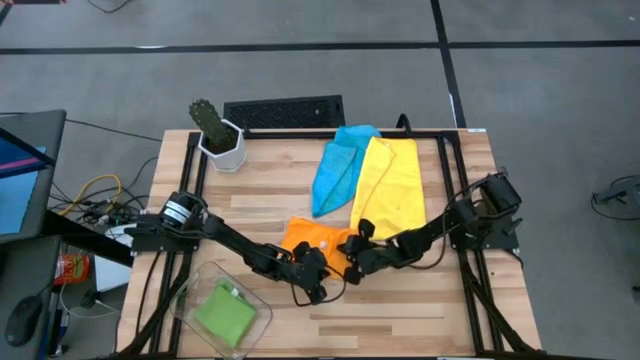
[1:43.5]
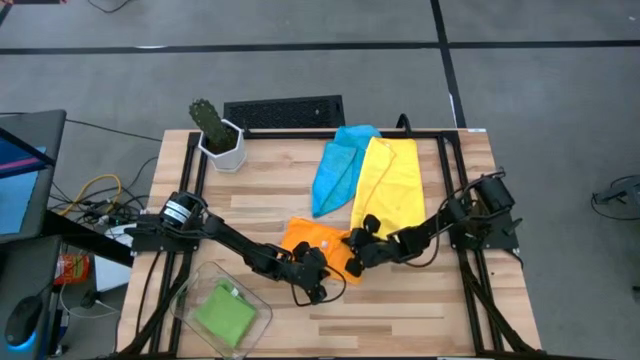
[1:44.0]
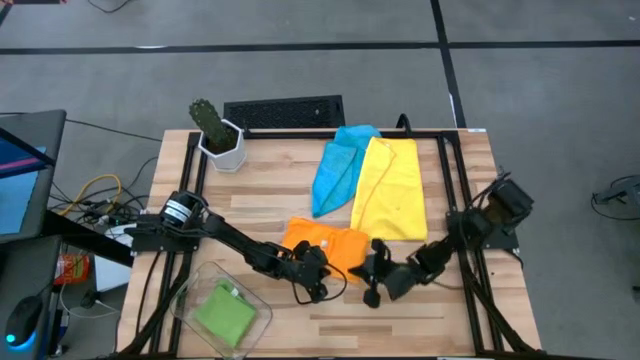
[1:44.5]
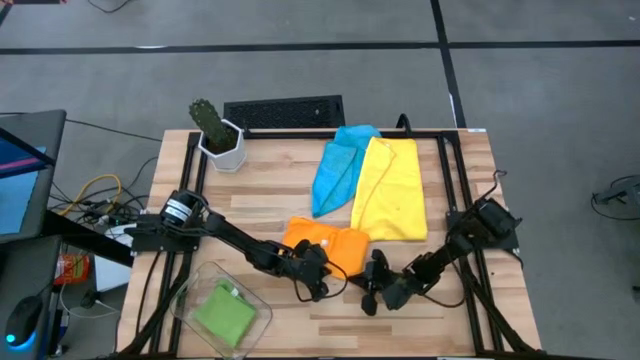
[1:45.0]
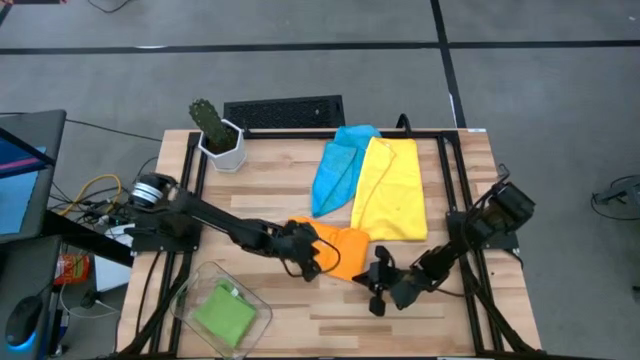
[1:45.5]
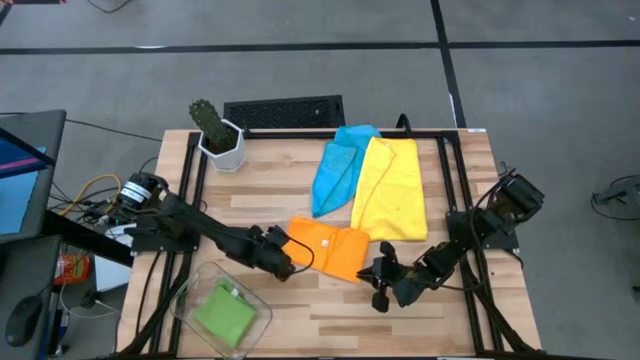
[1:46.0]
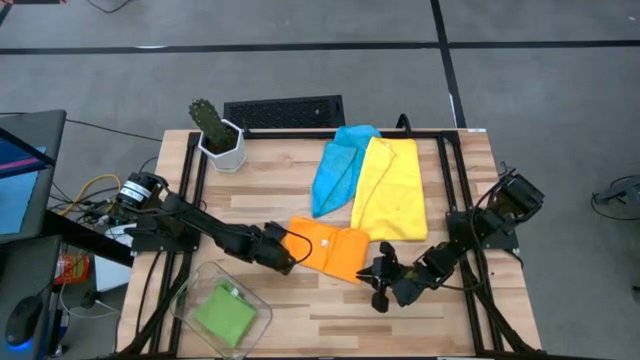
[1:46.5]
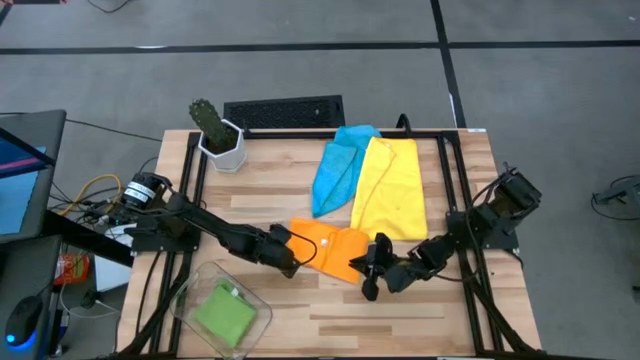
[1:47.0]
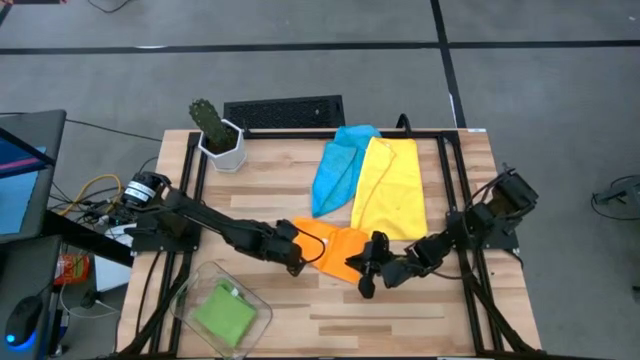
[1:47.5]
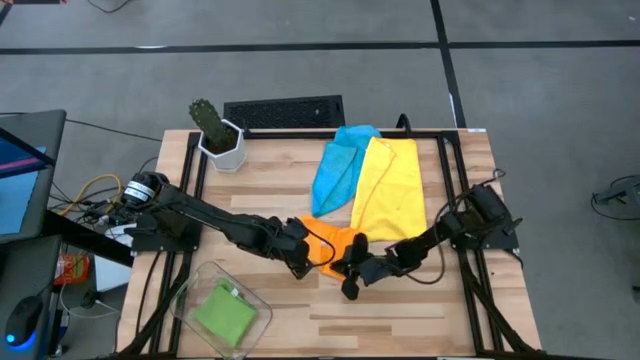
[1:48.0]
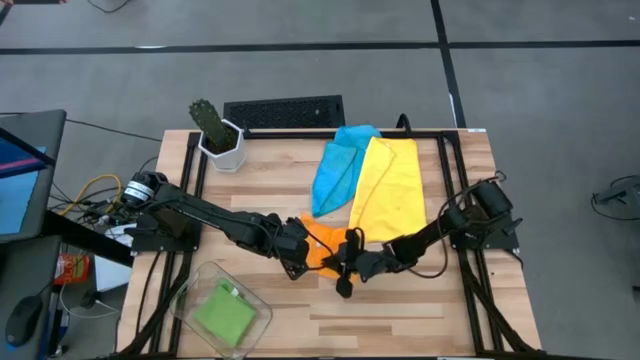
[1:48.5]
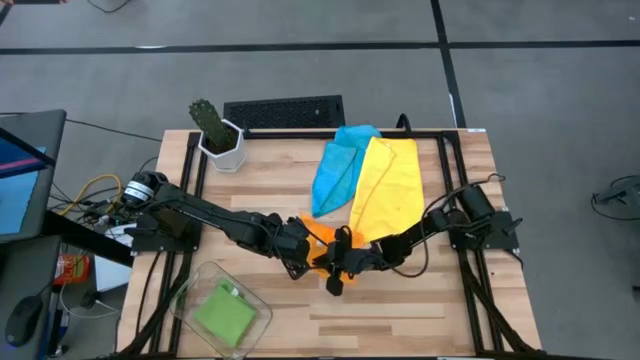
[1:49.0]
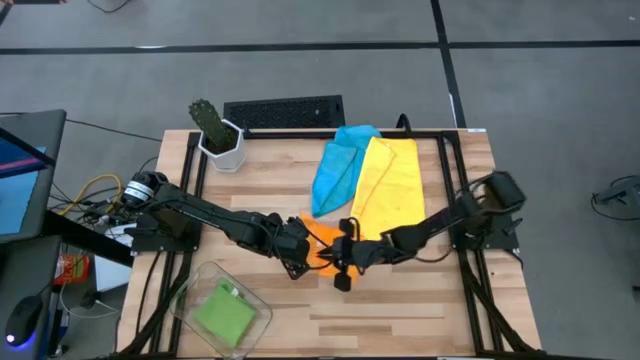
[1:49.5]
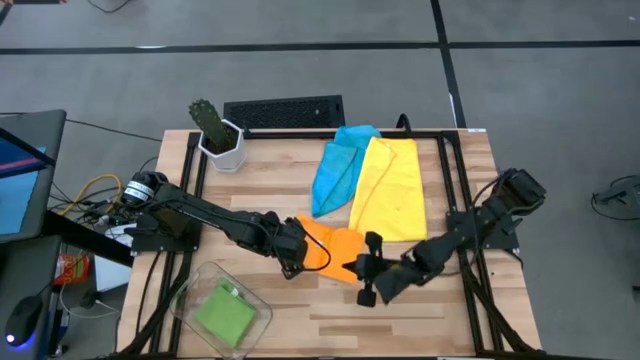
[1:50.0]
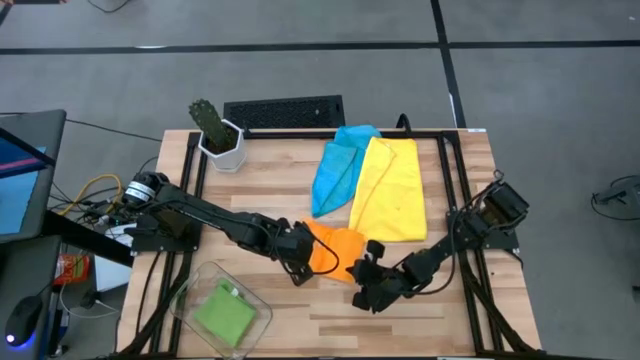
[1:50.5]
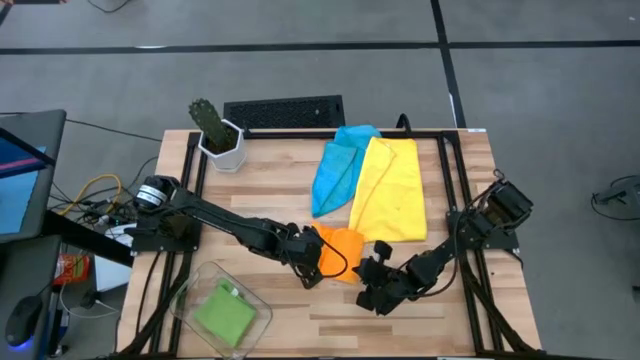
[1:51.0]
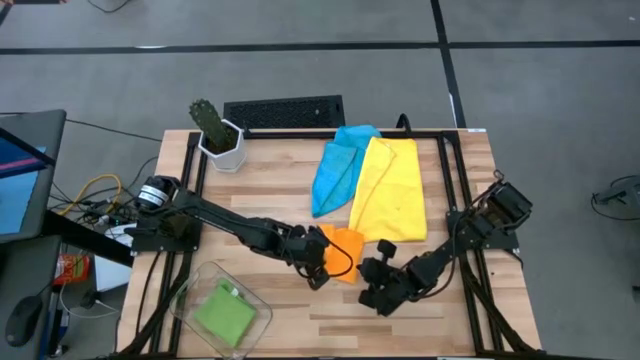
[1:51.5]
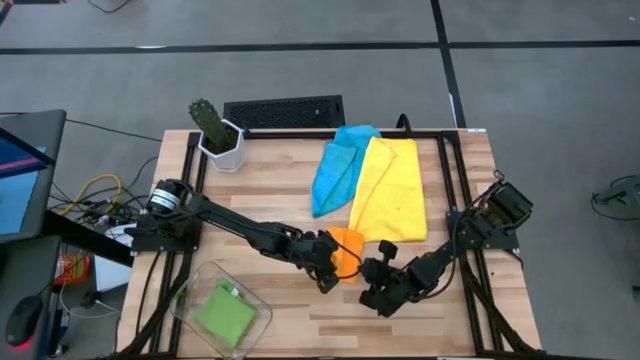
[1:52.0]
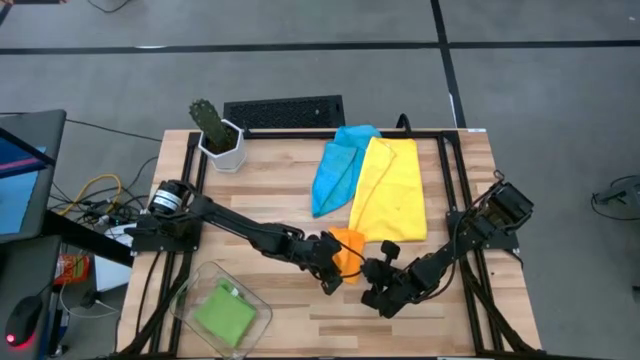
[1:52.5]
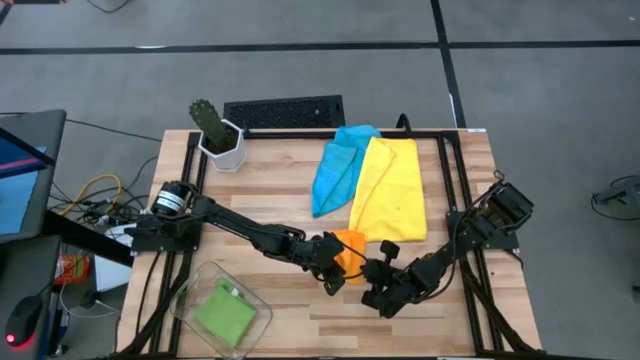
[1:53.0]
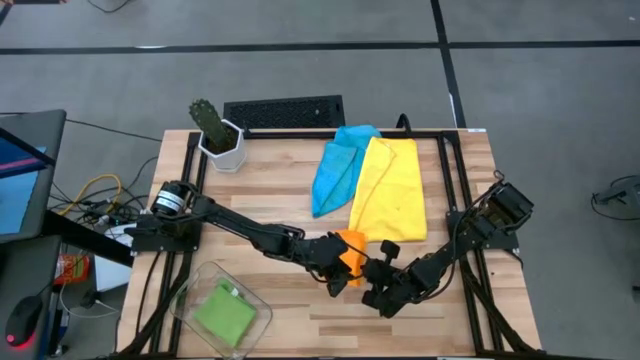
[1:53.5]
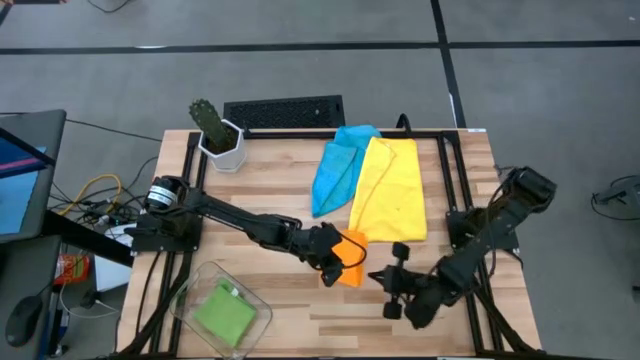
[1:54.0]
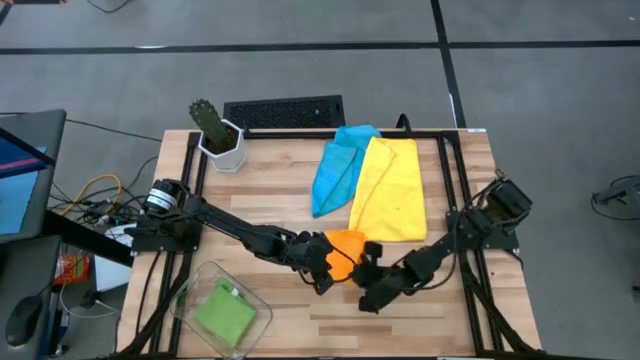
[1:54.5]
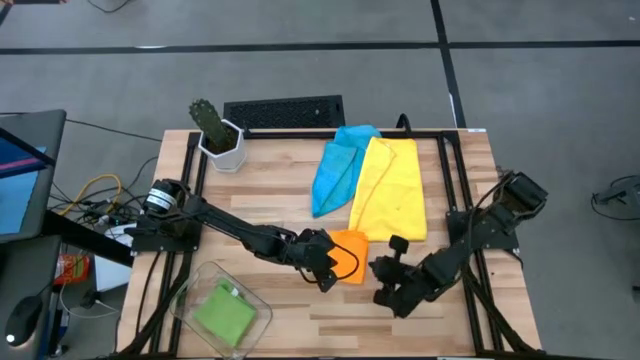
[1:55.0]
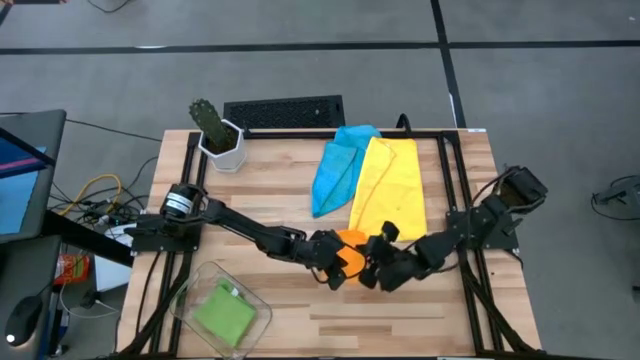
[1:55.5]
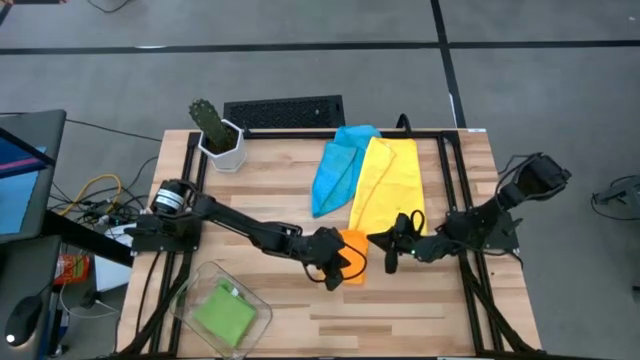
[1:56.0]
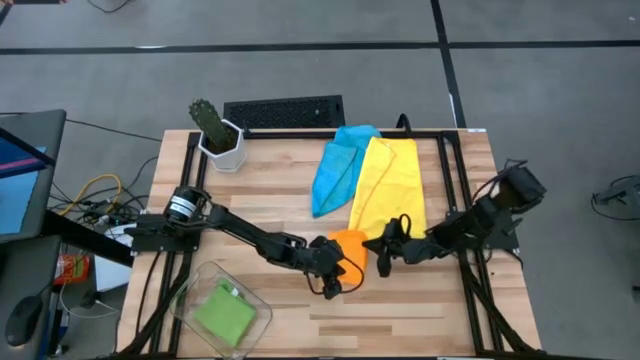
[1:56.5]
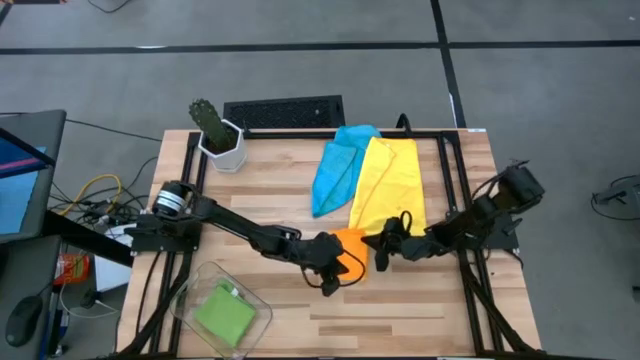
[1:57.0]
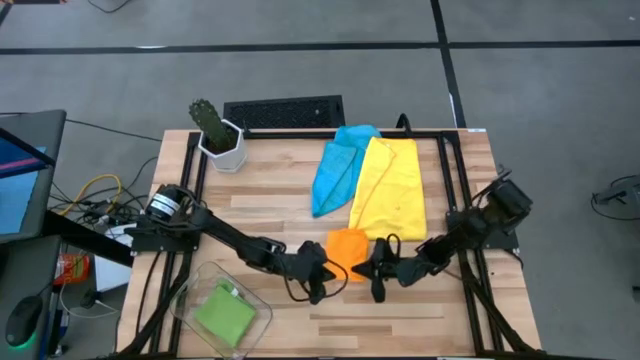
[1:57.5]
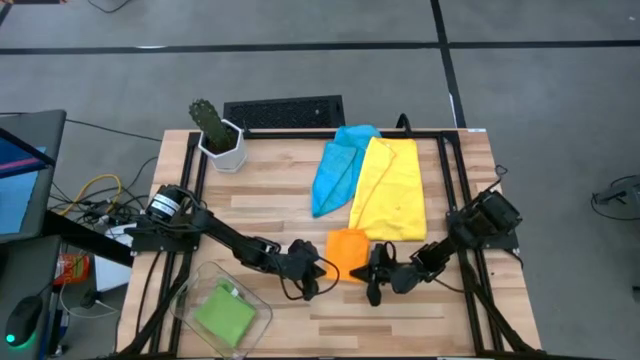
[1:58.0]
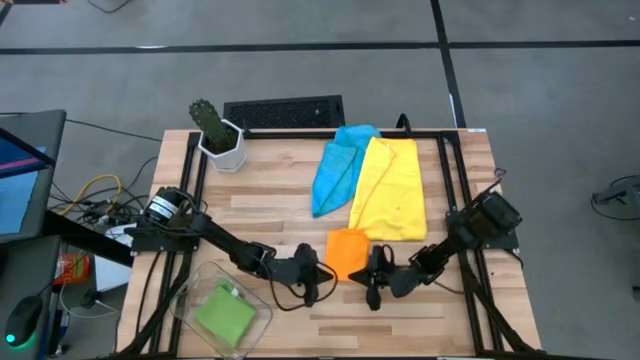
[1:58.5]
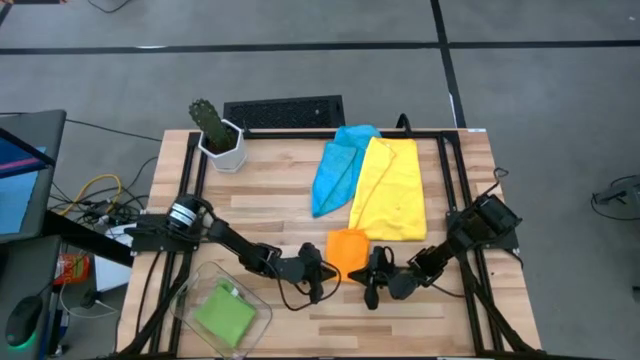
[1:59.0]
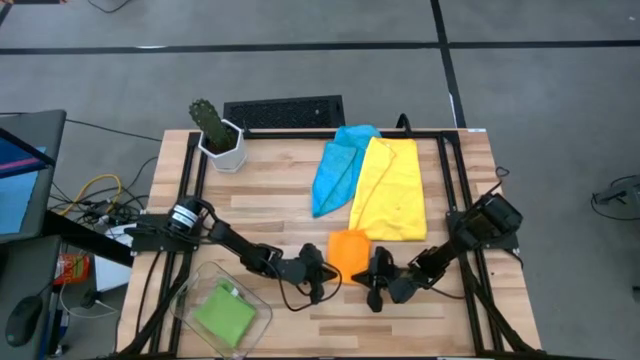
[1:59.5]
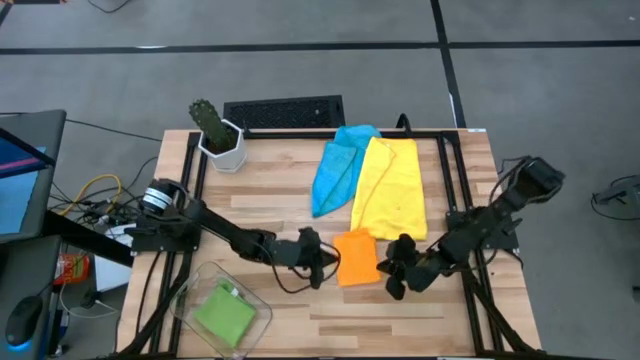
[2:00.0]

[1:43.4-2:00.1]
Task: Fold microfiber towels
Fold the orange microfiber towel

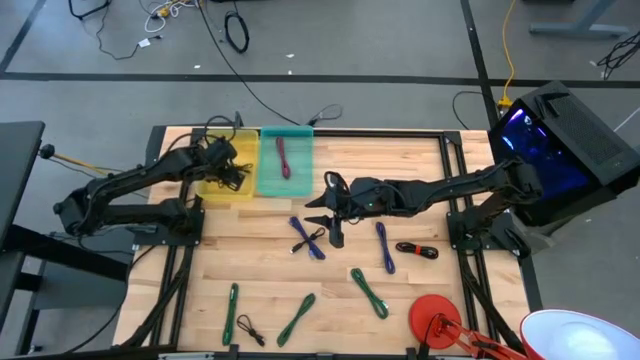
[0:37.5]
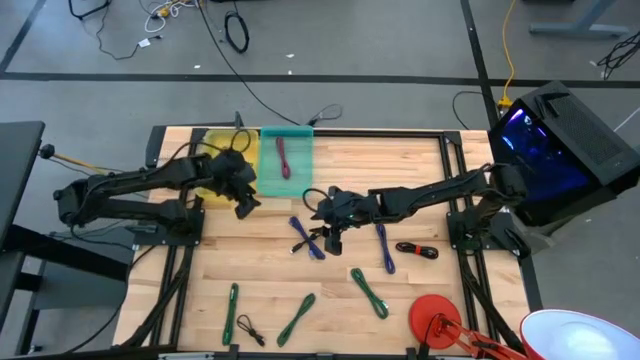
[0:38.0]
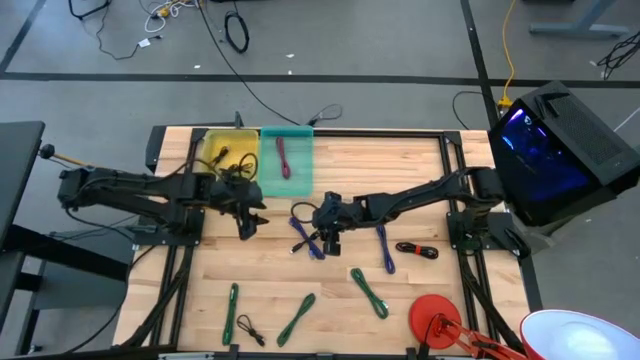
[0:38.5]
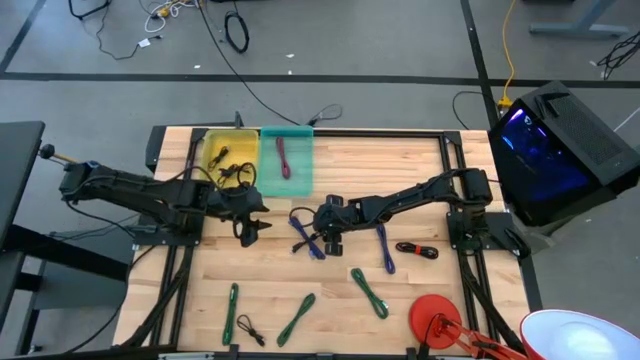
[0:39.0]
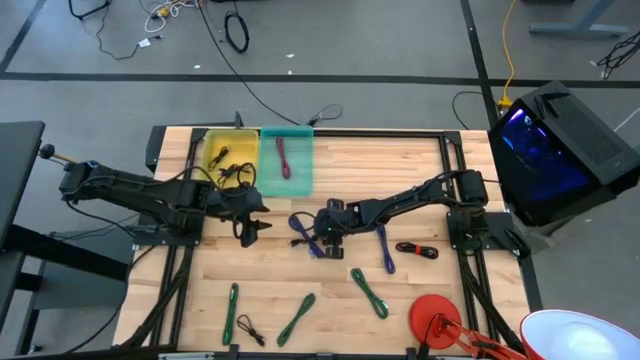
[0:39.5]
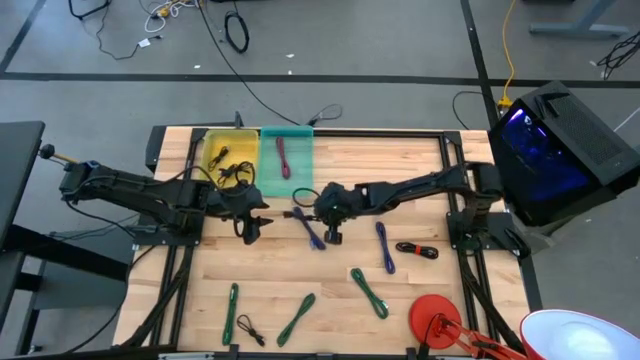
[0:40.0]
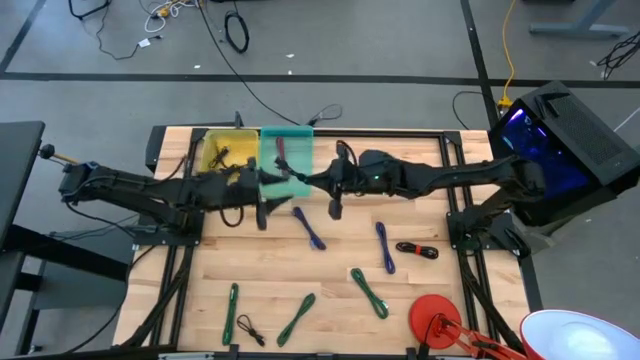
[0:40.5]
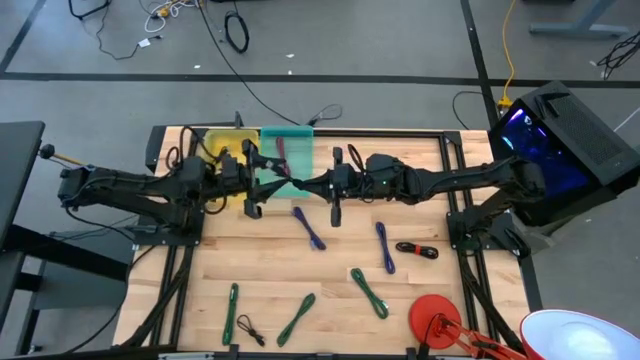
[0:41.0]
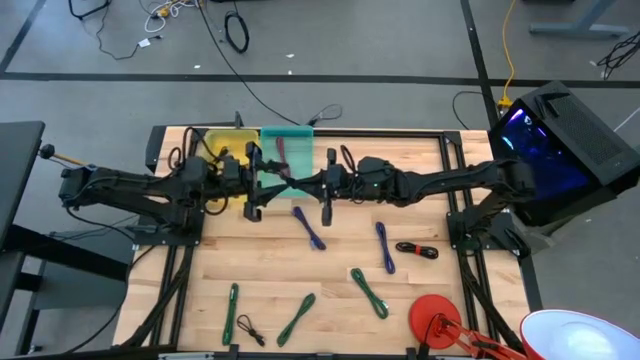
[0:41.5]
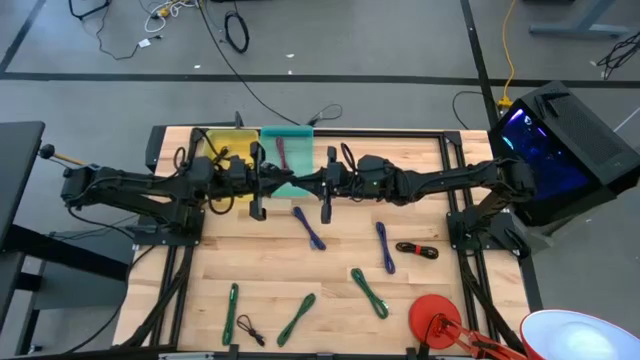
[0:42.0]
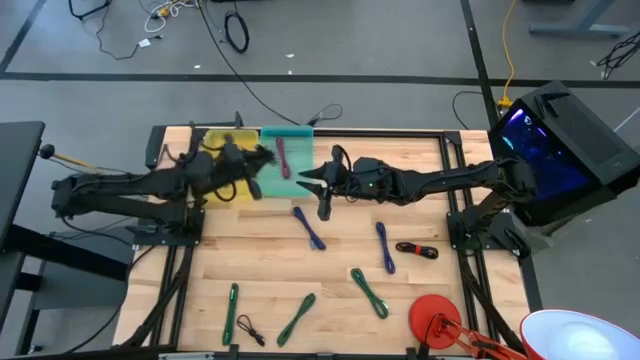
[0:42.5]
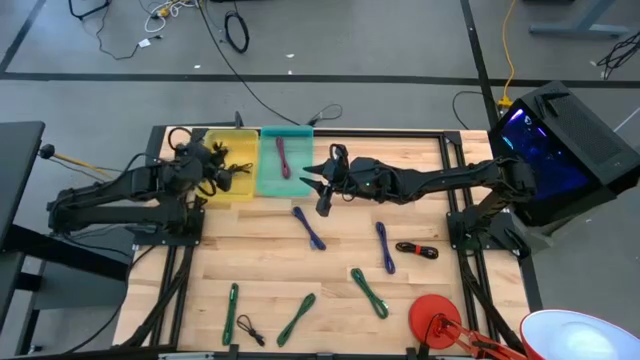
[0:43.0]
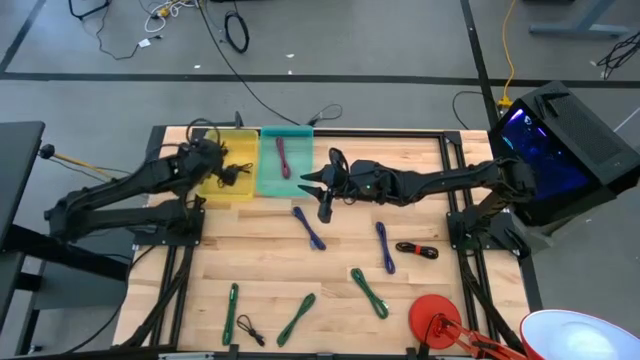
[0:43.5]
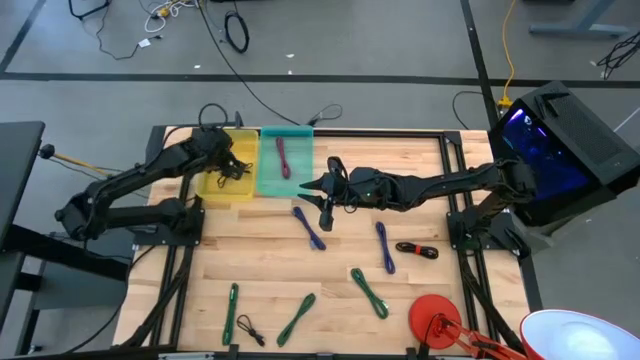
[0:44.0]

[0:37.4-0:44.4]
Task: Pick & Place USB Port
Put the black charger cable into the yellow bin
